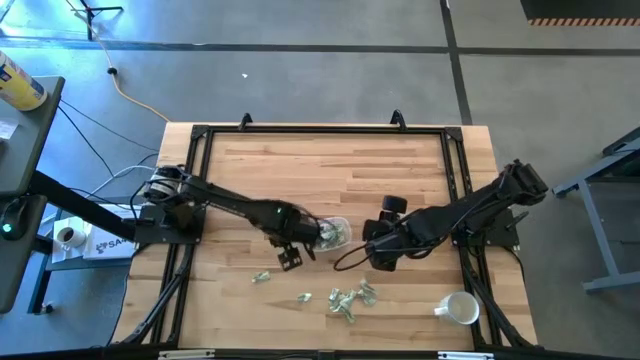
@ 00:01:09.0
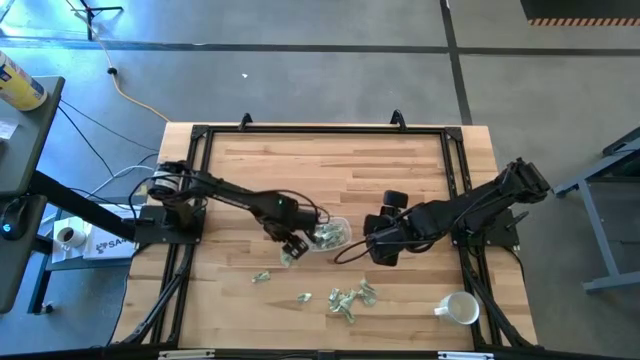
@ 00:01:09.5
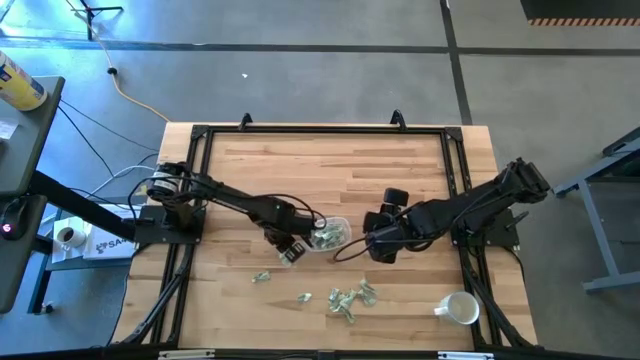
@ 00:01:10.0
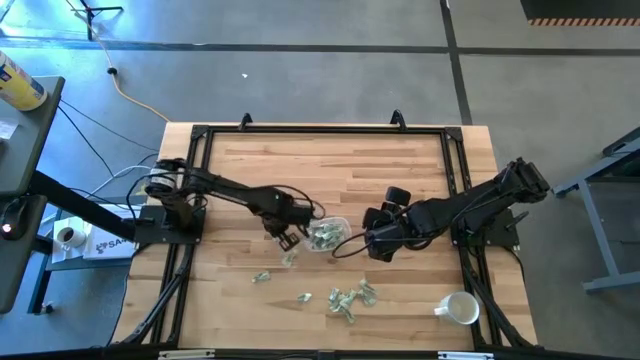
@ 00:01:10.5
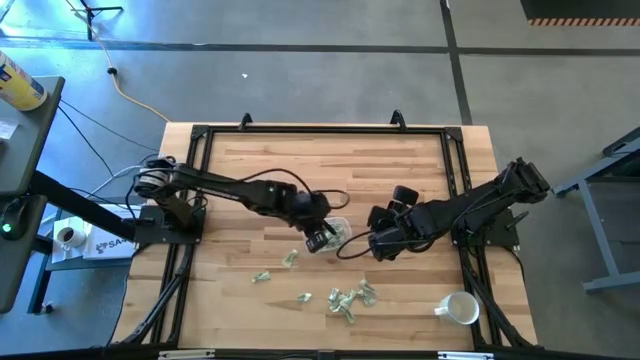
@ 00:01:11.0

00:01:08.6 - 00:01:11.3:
Task: Pick and place Stevia / Truvia into bins
Put the green stevia packet into the transparent bin

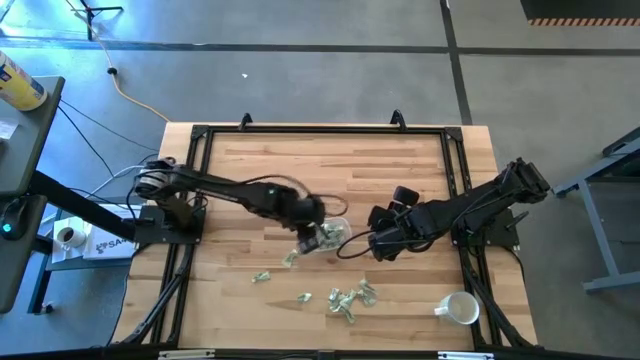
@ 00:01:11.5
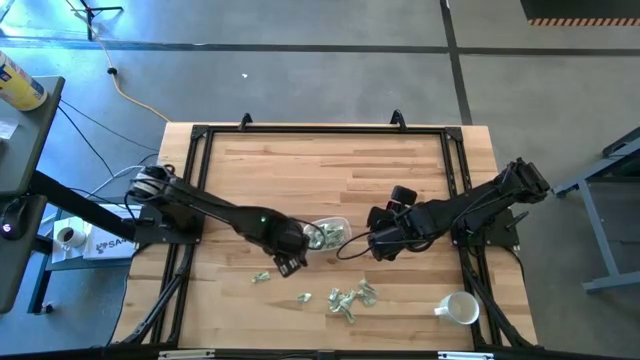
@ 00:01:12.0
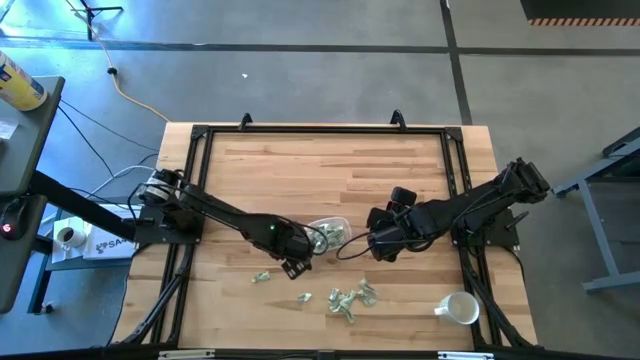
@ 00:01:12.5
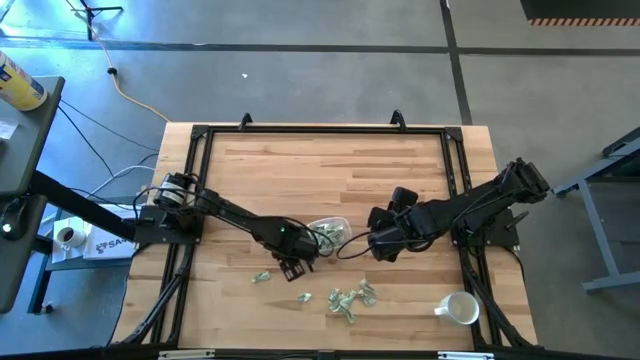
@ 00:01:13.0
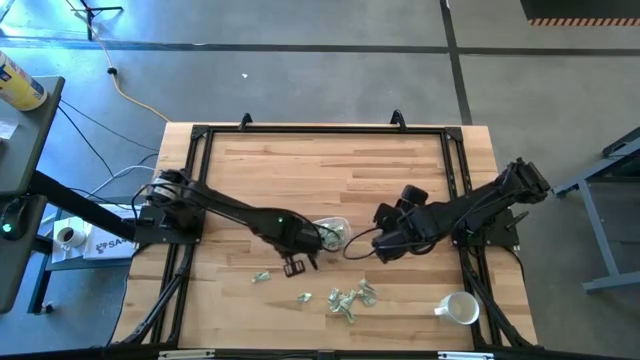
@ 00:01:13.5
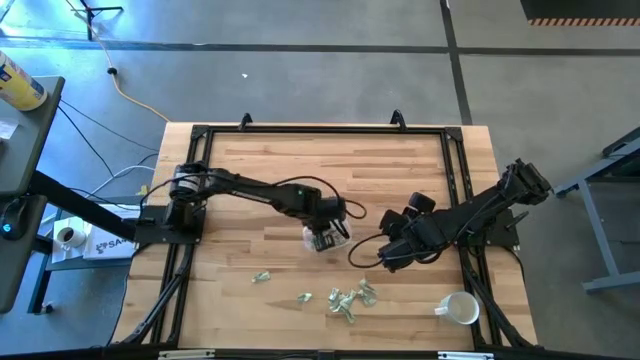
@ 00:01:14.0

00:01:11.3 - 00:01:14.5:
Put the green stevia packet into the transparent bin

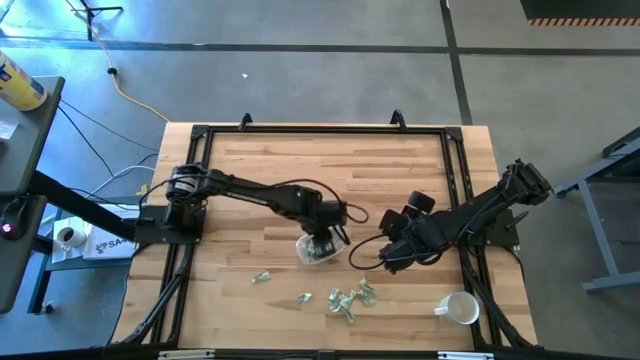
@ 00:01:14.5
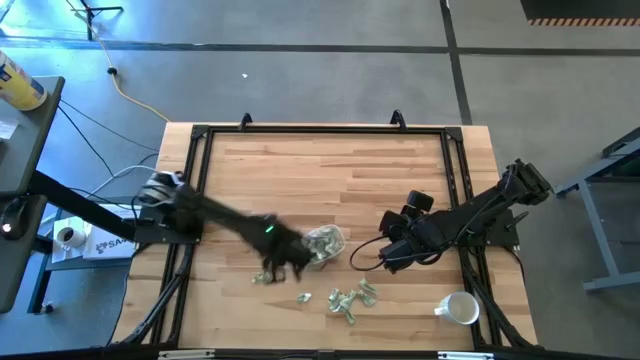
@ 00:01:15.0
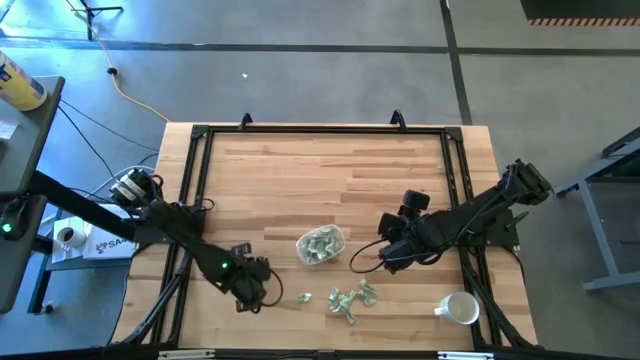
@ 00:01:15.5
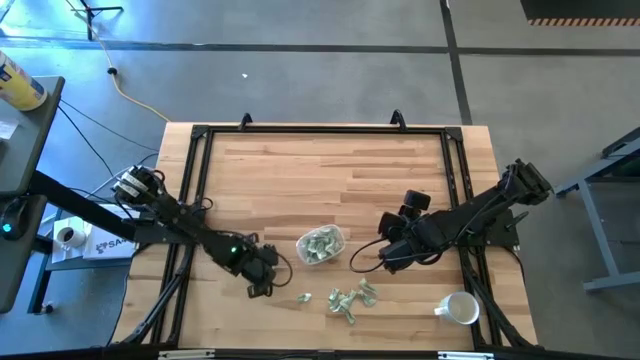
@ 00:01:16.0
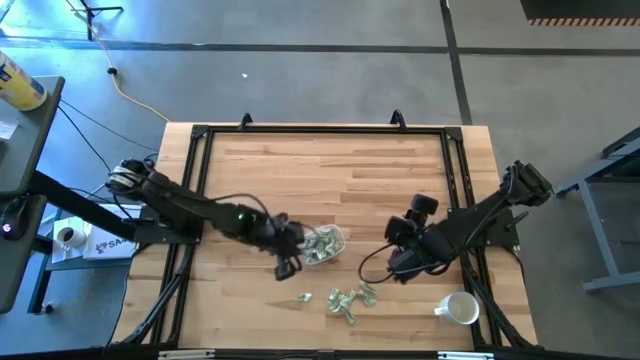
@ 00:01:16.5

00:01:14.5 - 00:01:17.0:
Put the green stevia packet into the transparent bin

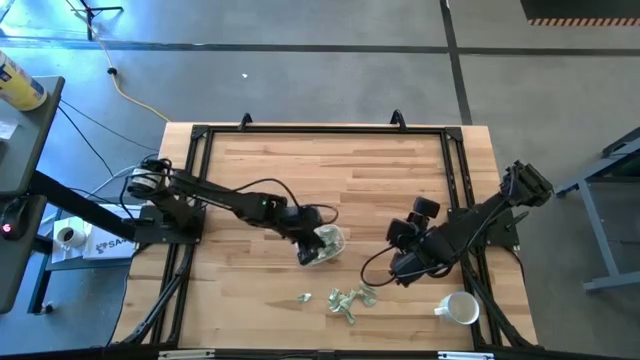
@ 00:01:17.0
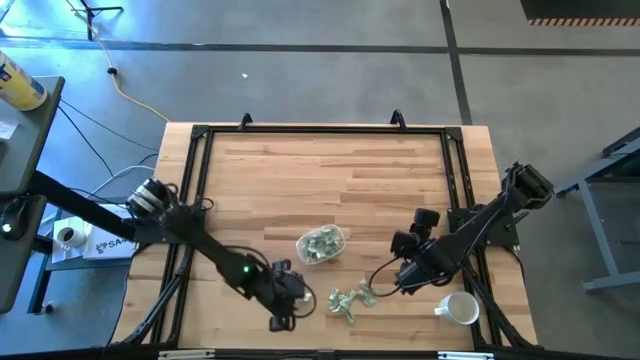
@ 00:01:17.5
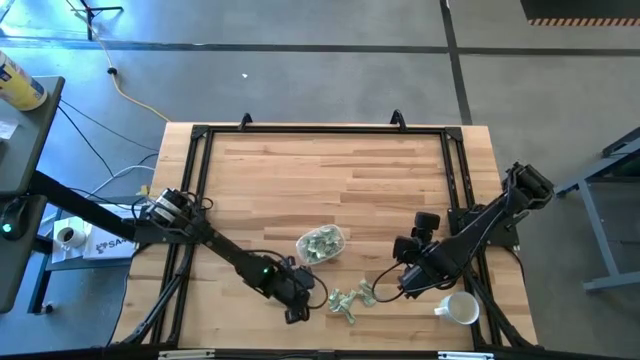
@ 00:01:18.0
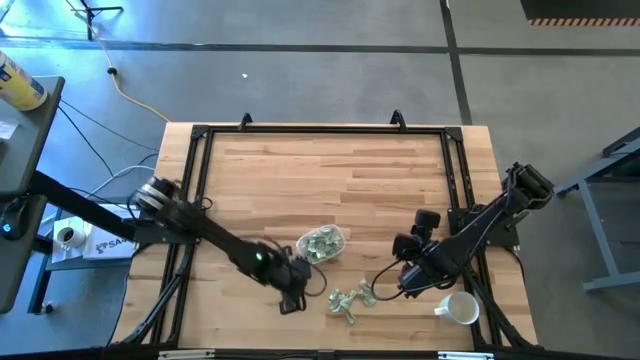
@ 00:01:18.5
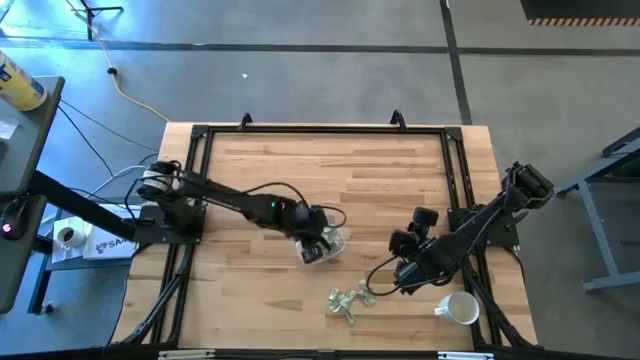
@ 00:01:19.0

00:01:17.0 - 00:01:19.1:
Put the green stevia packet into the transparent bin

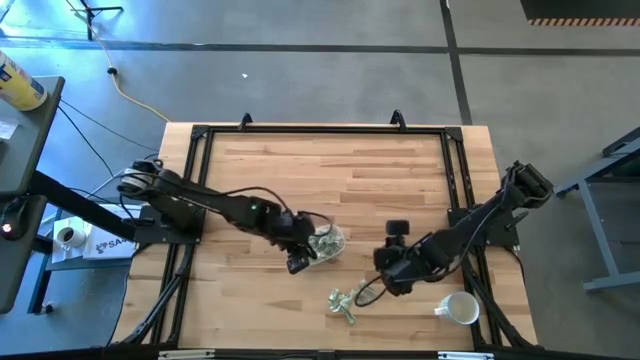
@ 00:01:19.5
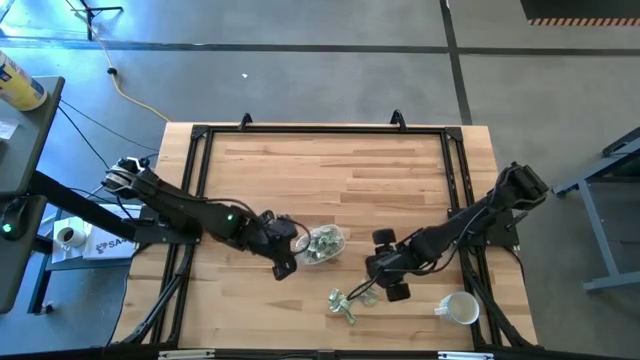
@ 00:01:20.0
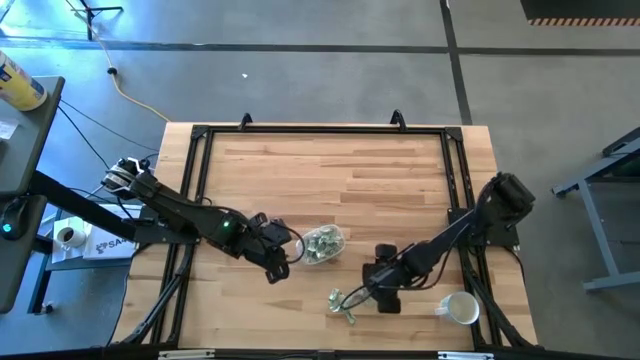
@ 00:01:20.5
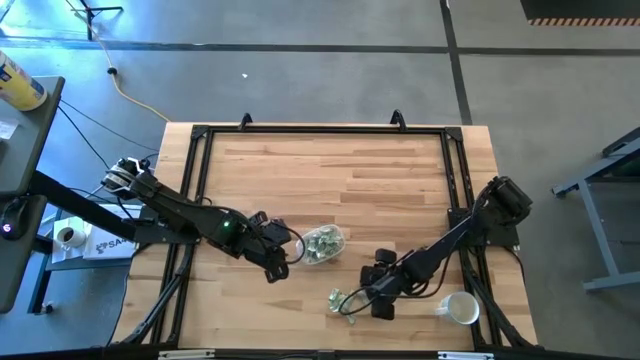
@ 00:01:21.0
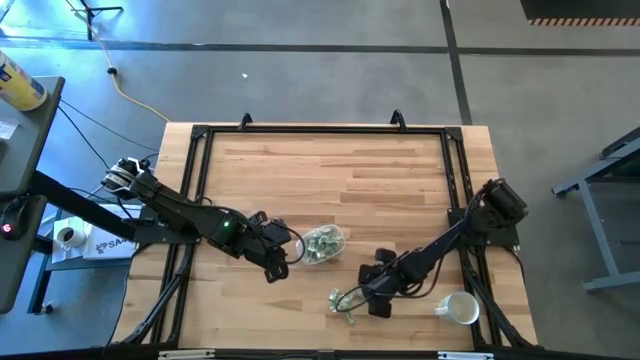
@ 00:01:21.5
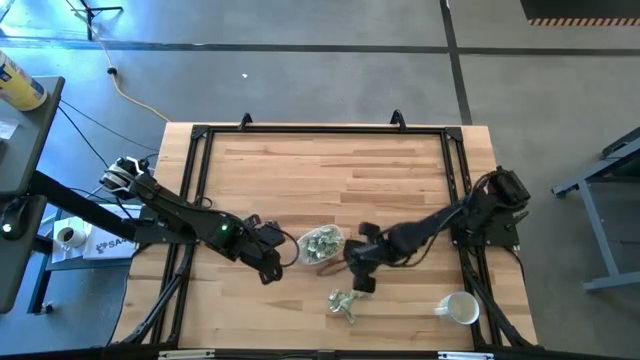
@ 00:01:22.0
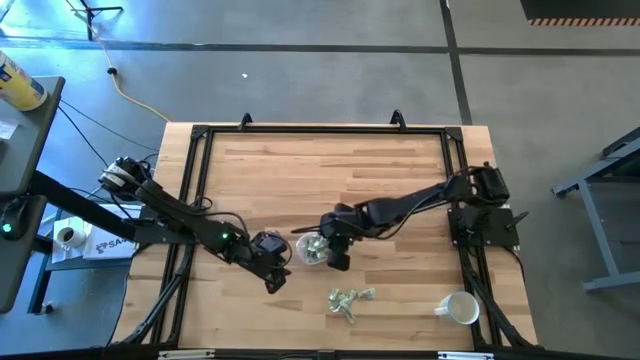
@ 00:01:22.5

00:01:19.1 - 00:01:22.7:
Put the green stevia packet into the transparent bin

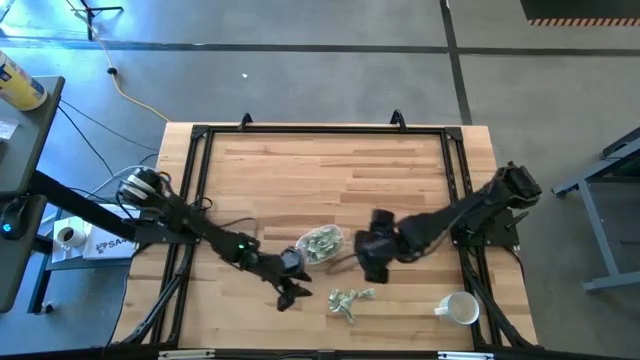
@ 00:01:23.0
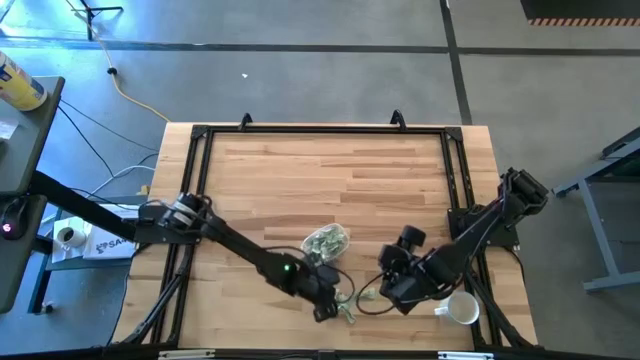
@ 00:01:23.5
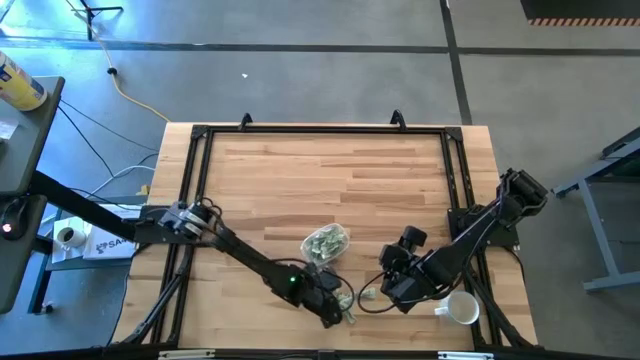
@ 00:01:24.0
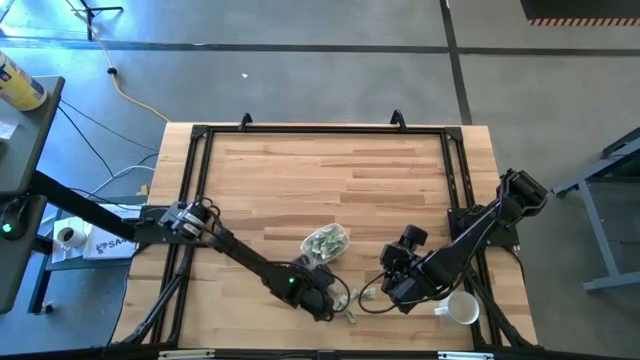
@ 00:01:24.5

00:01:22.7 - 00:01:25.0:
Put the green stevia packet into the transparent bin

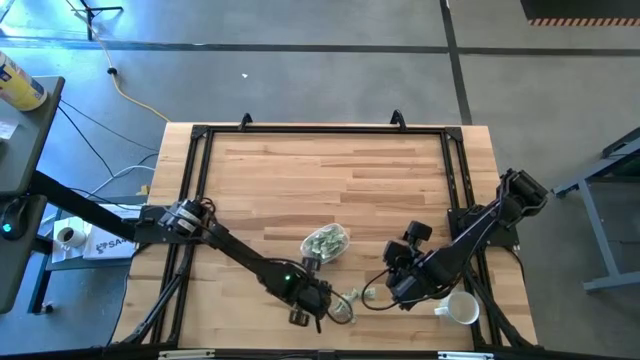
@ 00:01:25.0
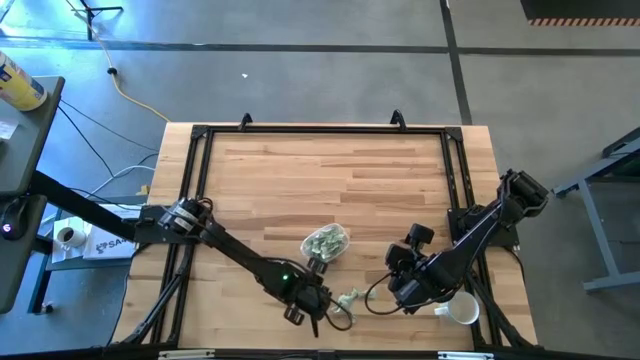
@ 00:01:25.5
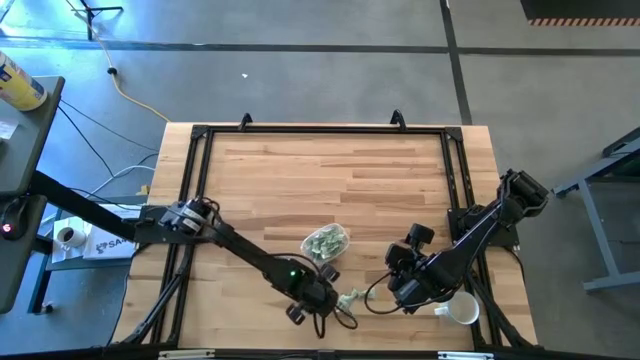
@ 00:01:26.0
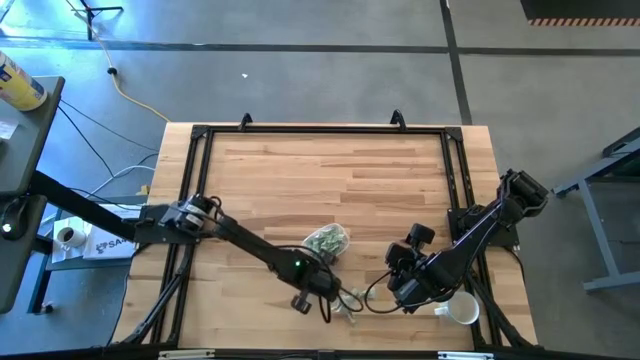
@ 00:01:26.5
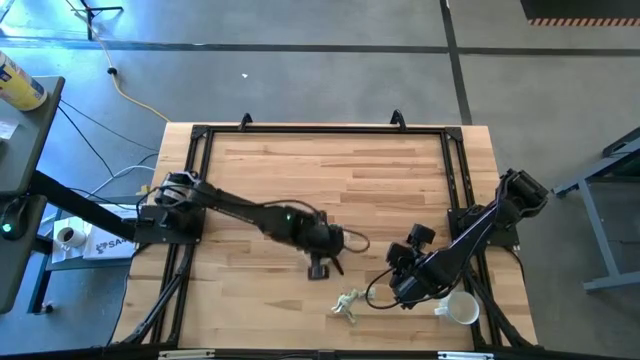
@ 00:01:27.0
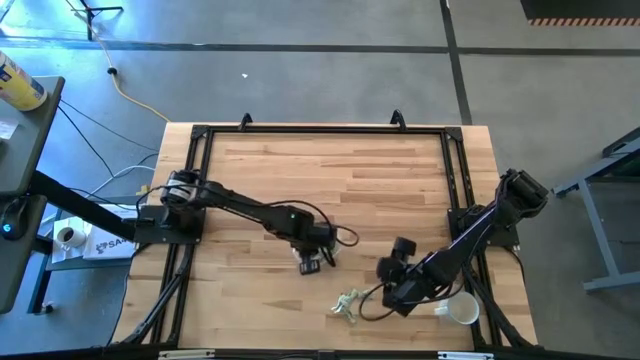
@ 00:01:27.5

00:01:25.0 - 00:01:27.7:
Put the green stevia packet into the transparent bin

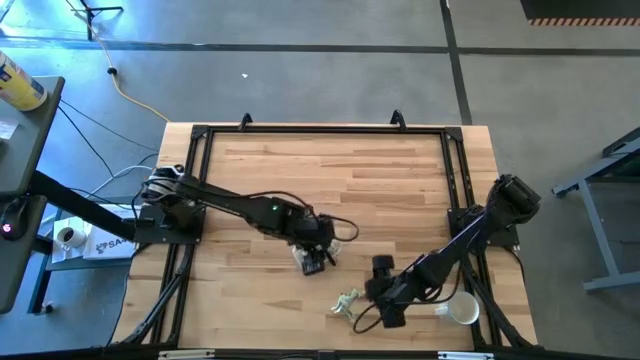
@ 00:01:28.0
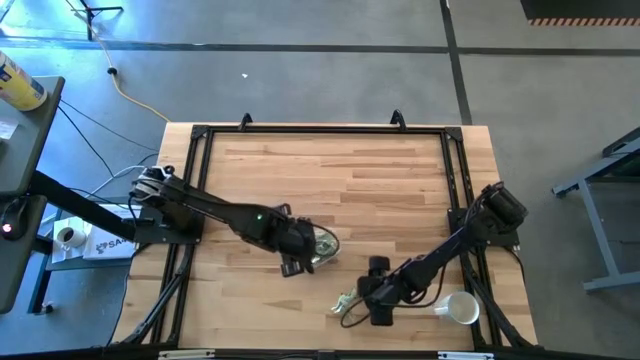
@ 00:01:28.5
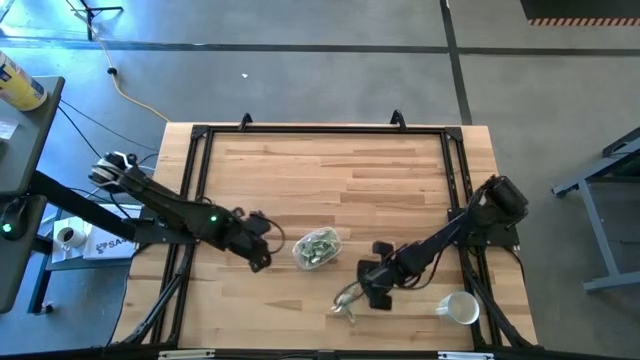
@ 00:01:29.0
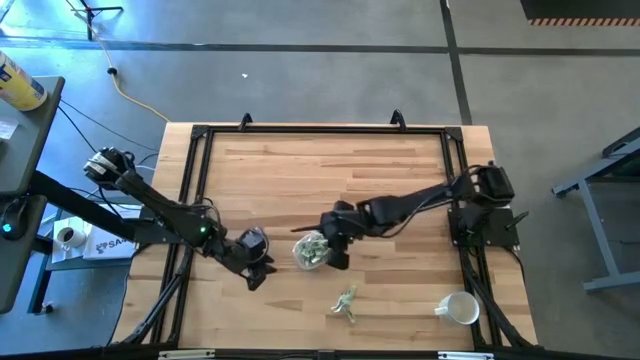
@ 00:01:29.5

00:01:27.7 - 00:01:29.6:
Put the green stevia packet into the transparent bin

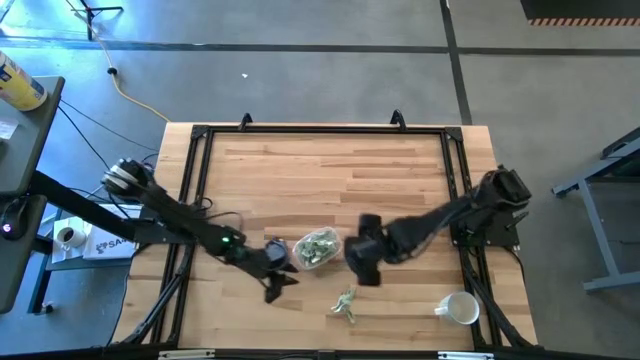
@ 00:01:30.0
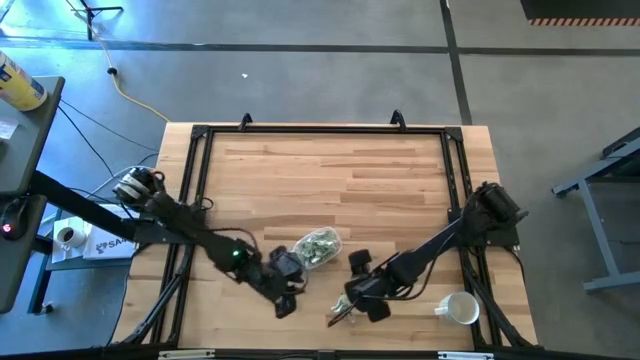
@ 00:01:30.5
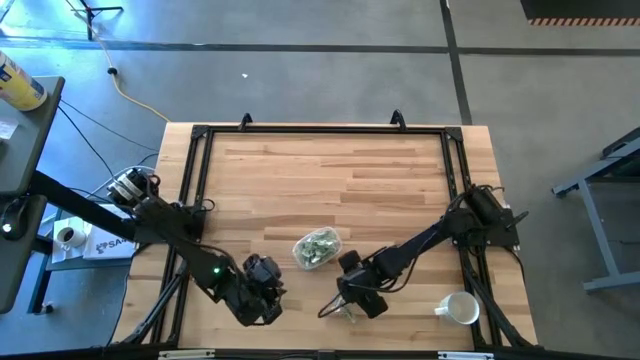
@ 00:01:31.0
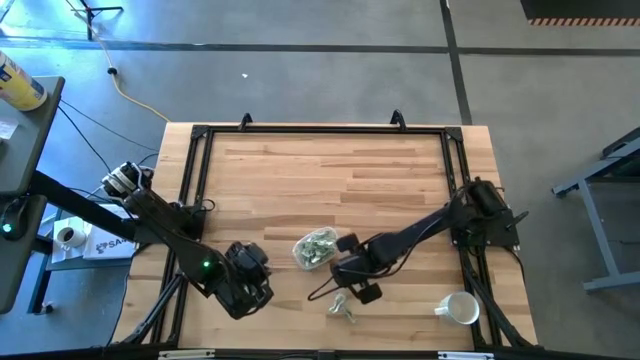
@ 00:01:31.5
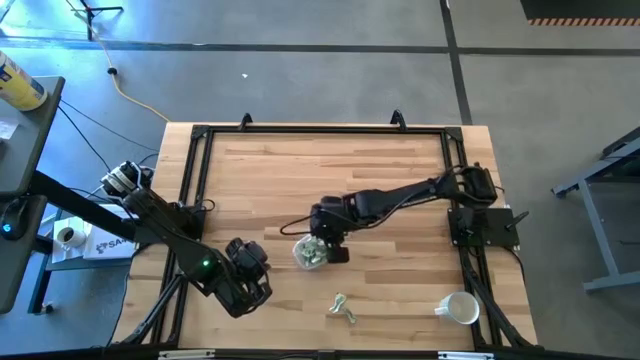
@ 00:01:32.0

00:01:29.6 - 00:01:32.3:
Put the green stevia packet into the transparent bin
